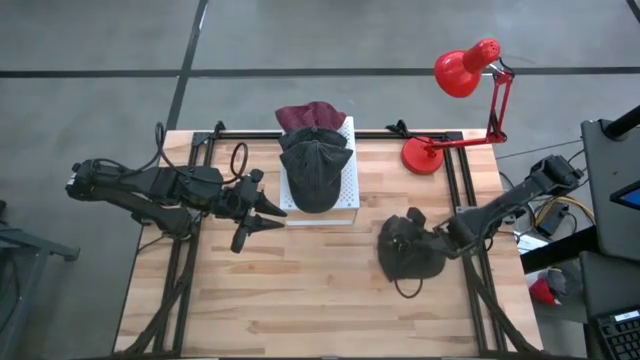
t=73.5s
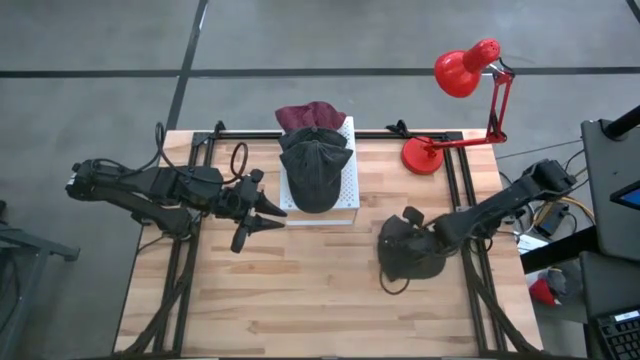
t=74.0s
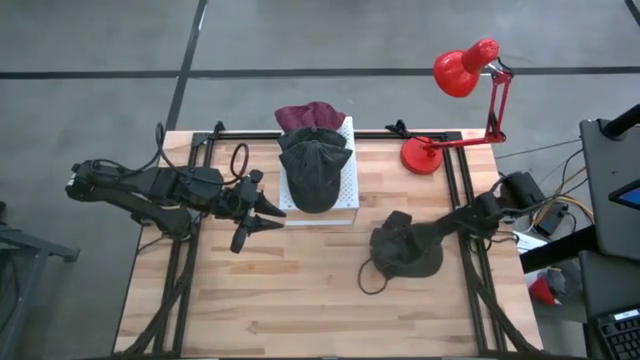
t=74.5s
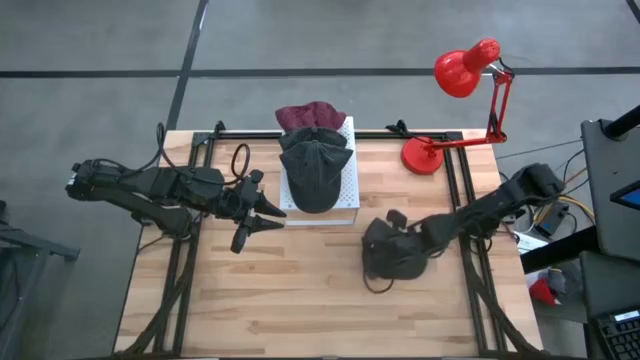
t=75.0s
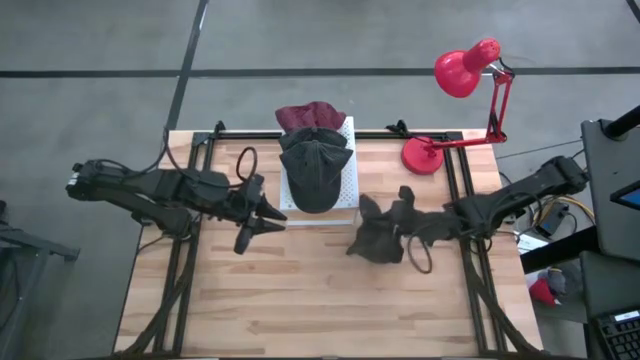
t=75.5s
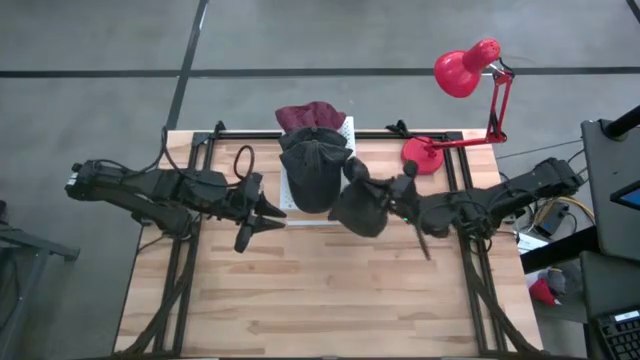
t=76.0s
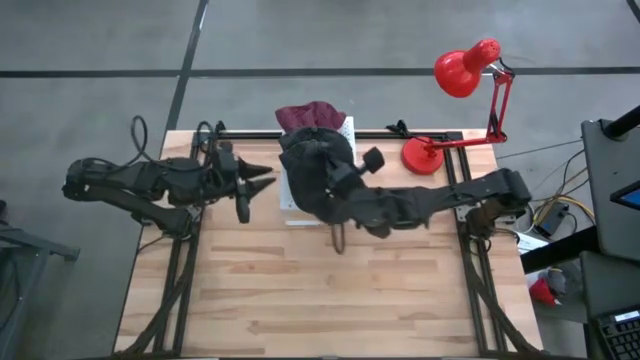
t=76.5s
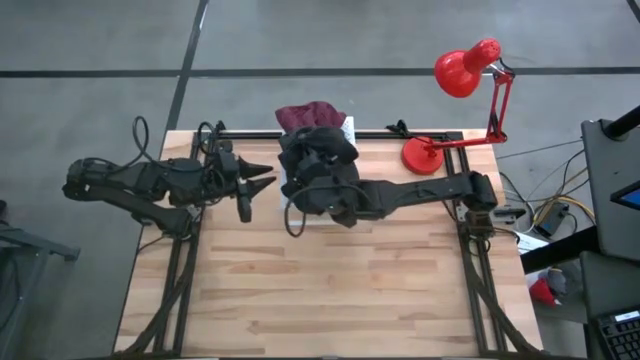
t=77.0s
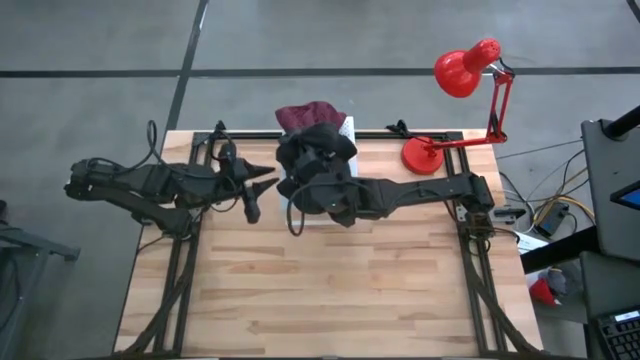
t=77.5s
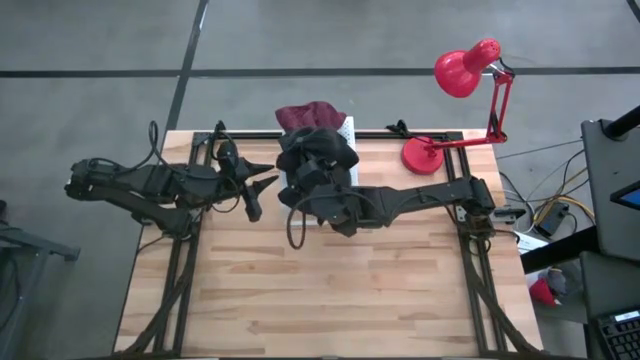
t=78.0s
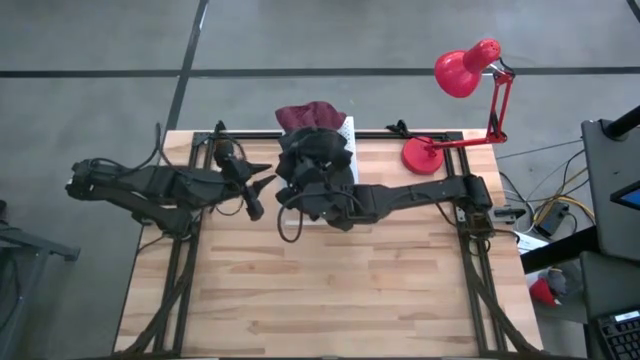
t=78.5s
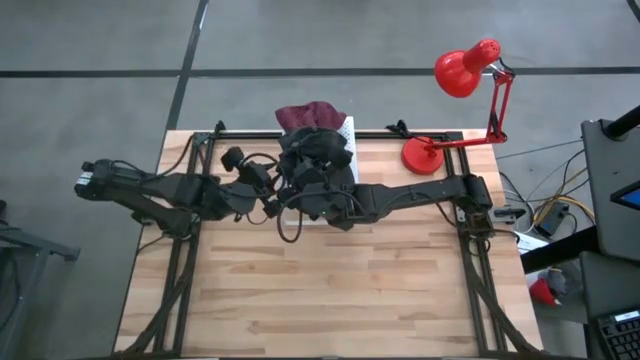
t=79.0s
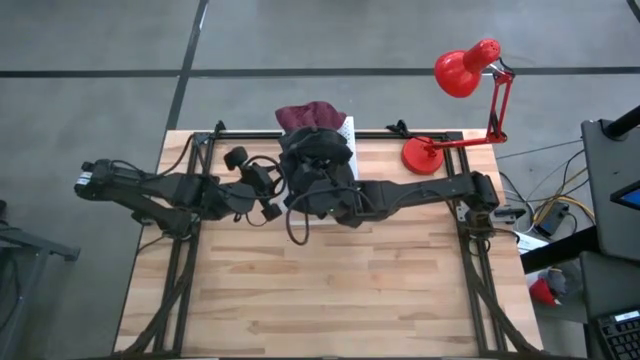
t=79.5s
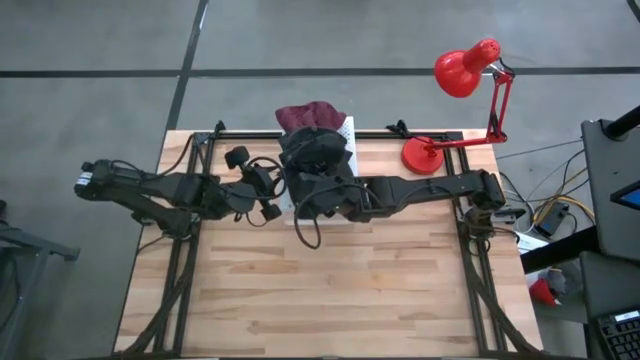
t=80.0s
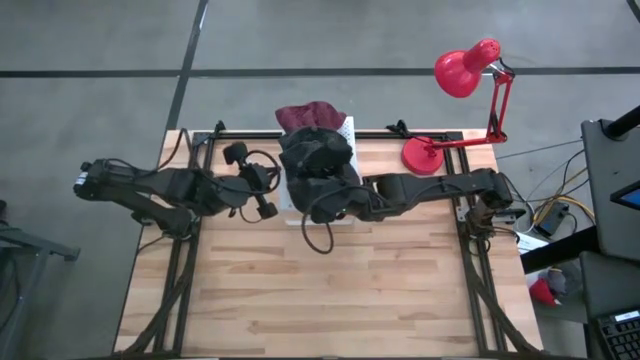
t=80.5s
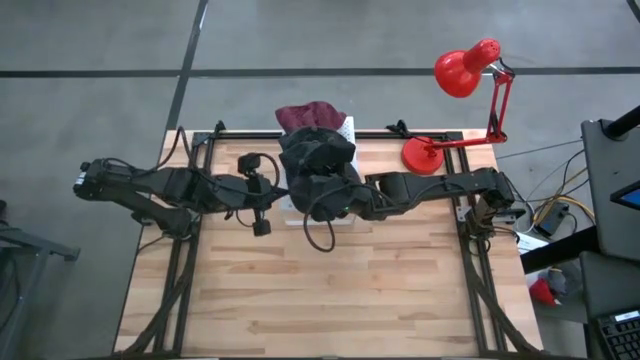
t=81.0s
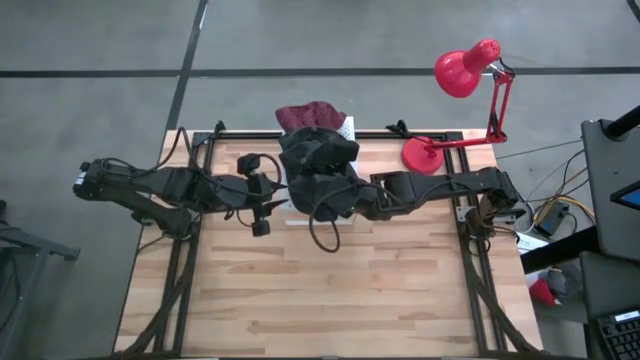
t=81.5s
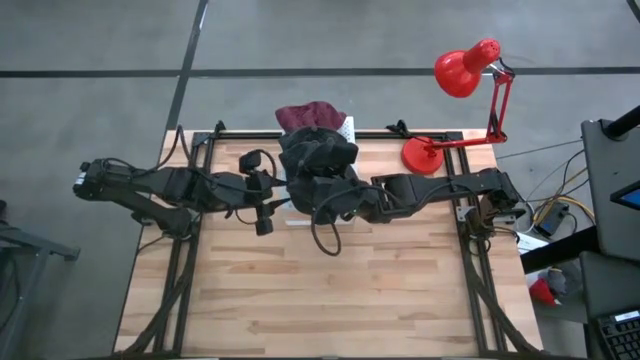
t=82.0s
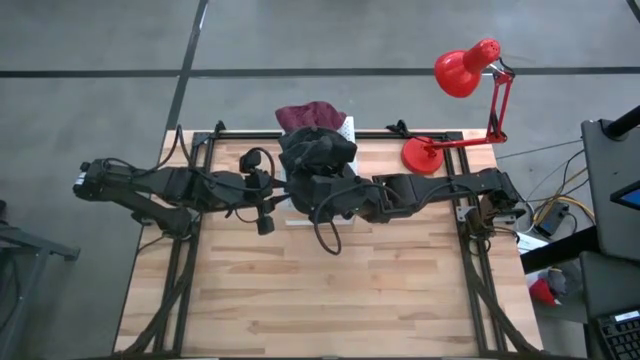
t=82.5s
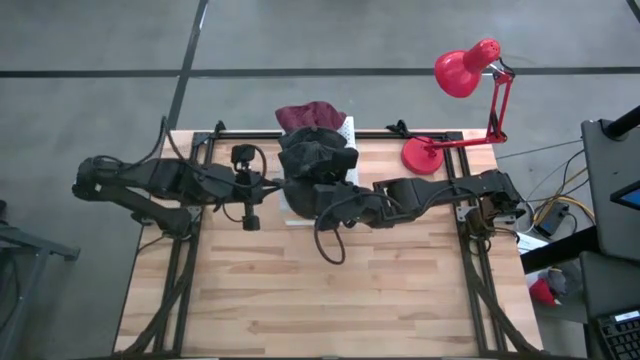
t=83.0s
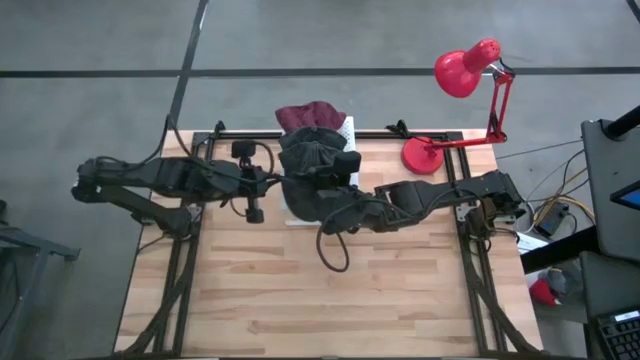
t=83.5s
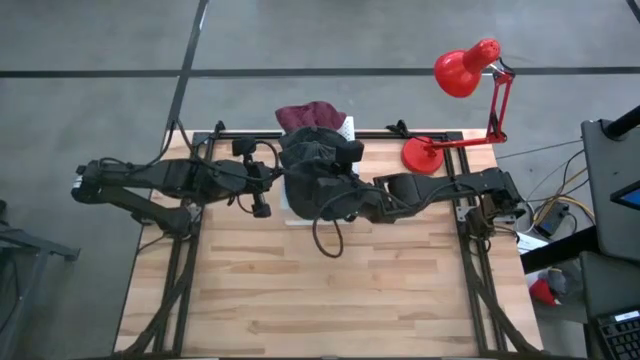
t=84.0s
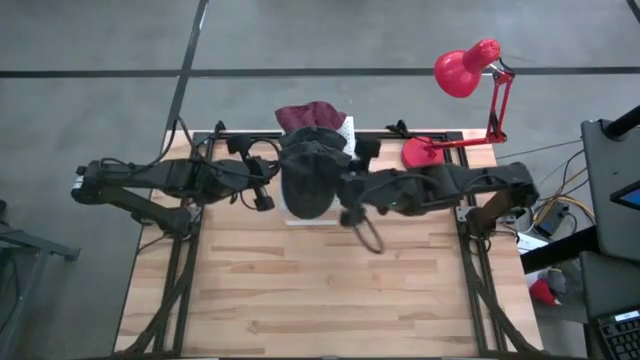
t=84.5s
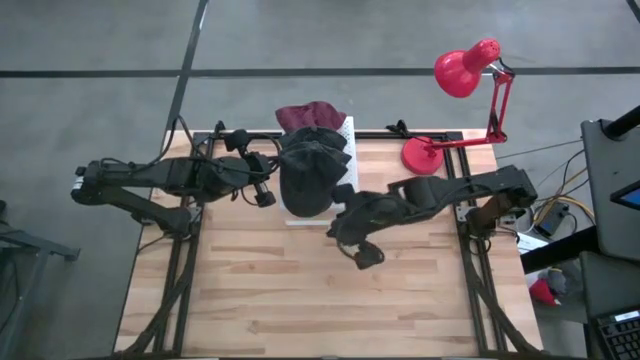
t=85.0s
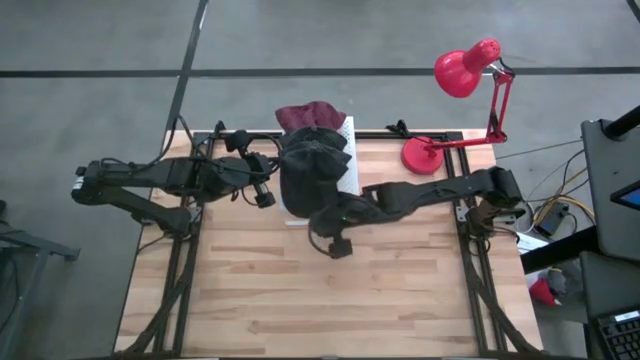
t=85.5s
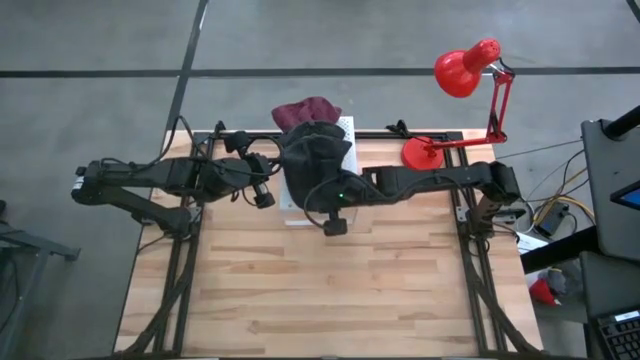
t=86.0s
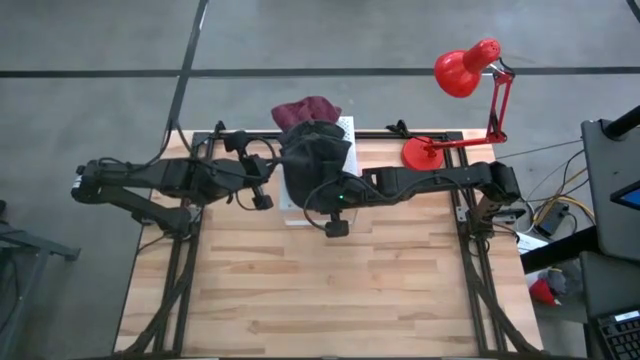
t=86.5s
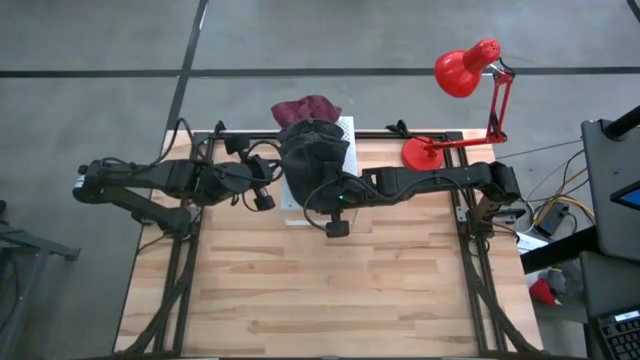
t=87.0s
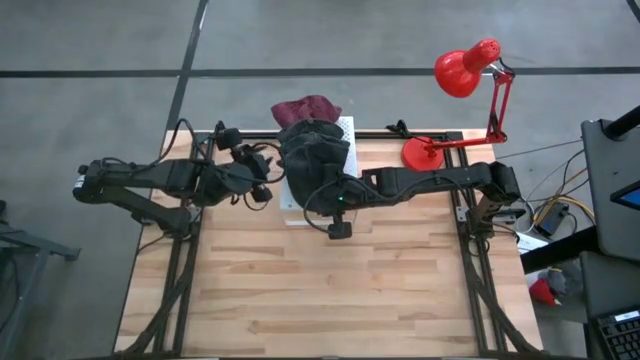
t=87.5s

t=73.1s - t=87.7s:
Task: Pick & Place hat
Stack the black cap on the black caps on the shelf

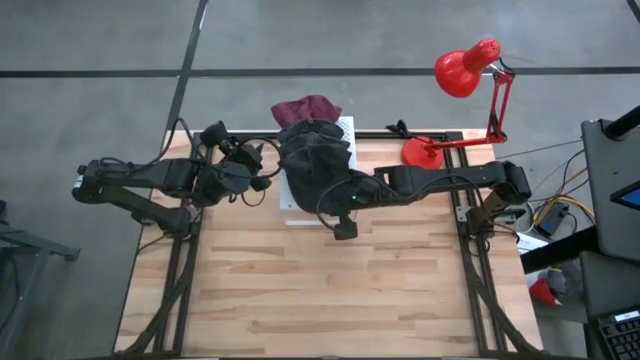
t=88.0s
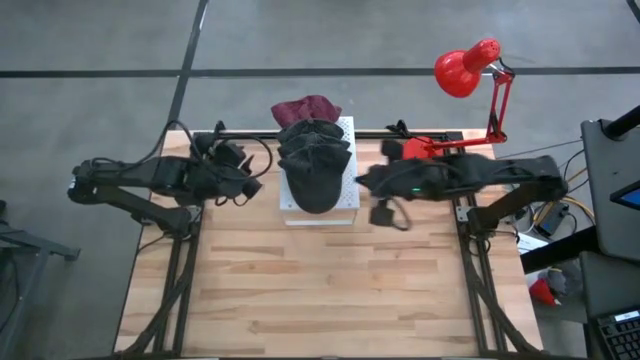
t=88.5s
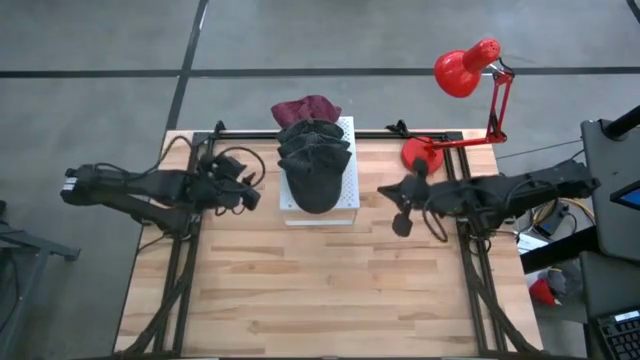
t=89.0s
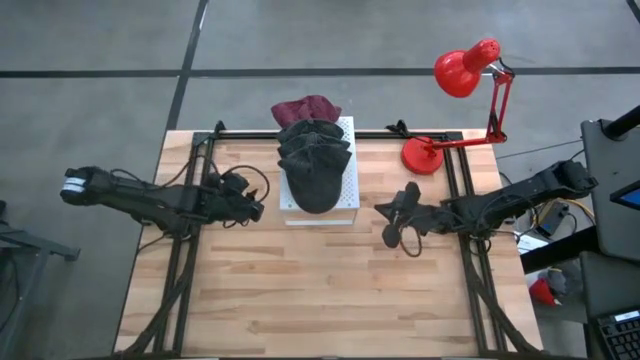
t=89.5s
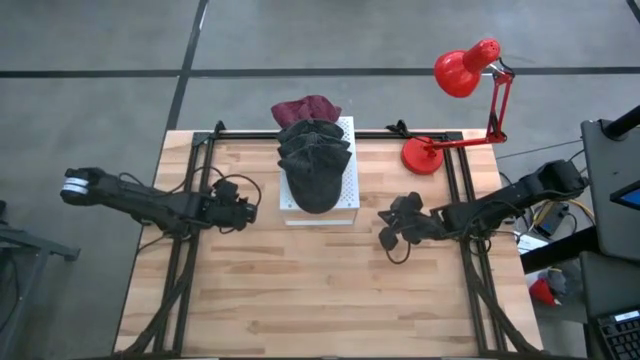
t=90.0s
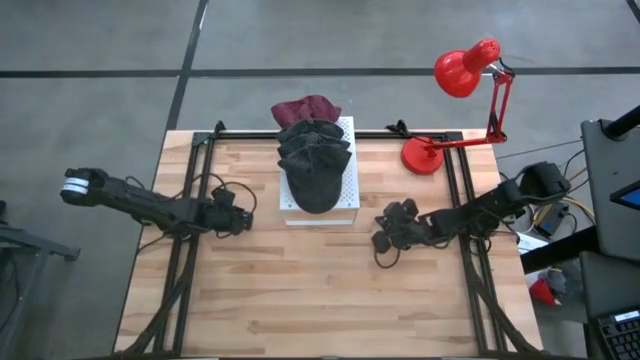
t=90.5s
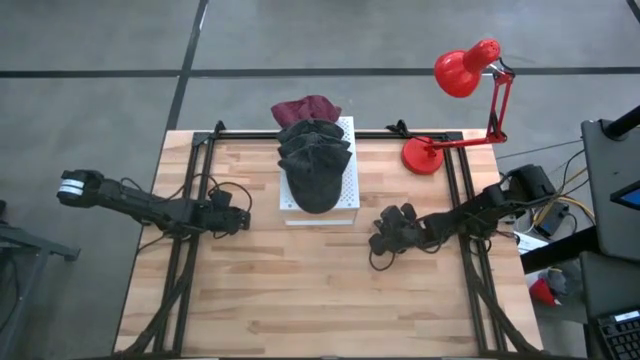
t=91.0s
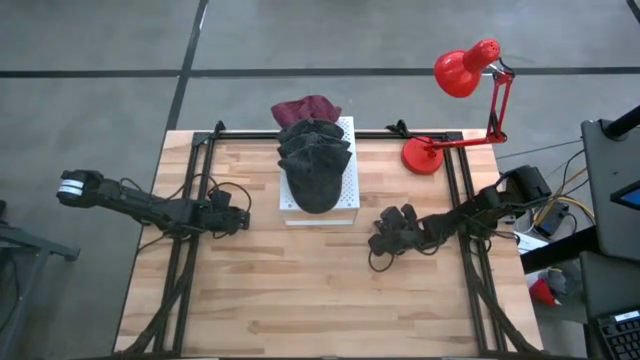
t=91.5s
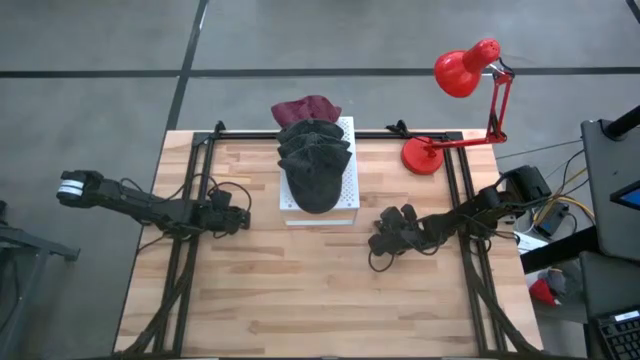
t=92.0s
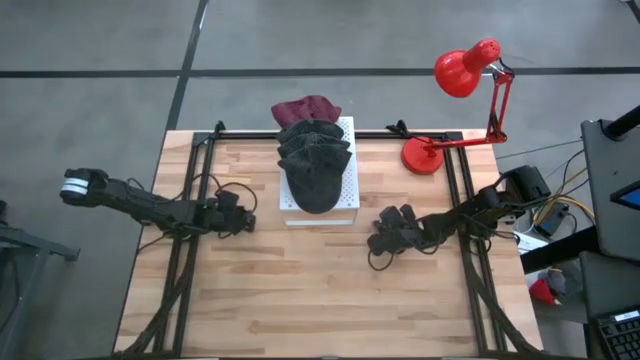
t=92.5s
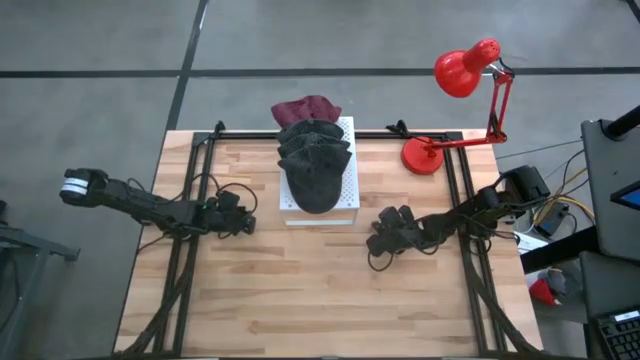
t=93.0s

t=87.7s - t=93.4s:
Return to Home Position
